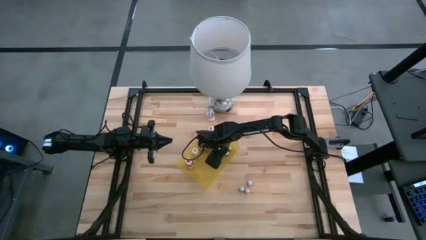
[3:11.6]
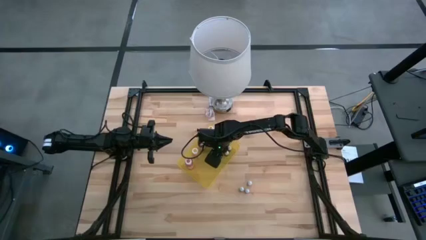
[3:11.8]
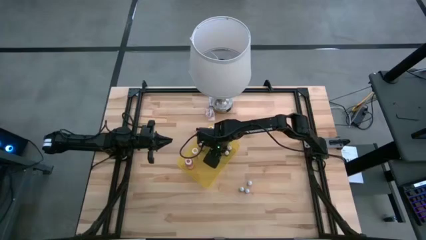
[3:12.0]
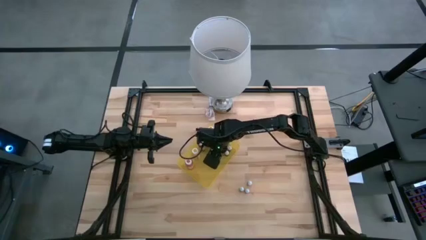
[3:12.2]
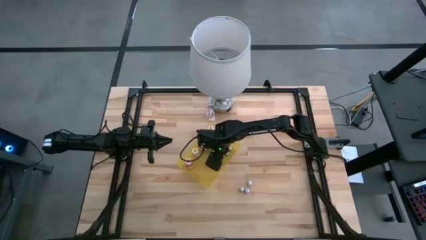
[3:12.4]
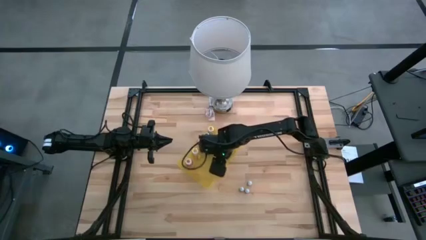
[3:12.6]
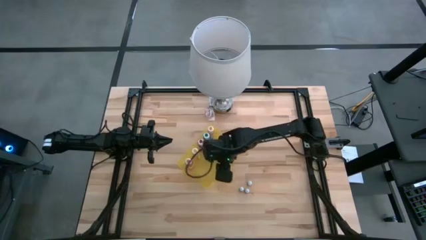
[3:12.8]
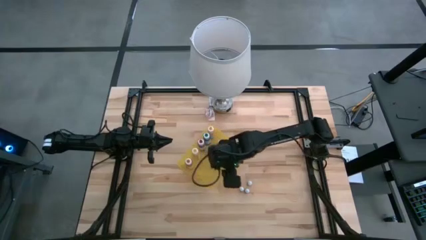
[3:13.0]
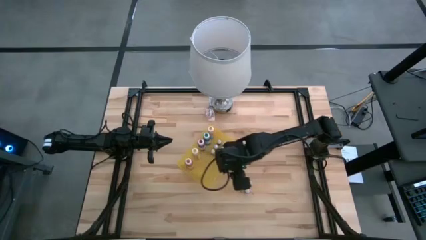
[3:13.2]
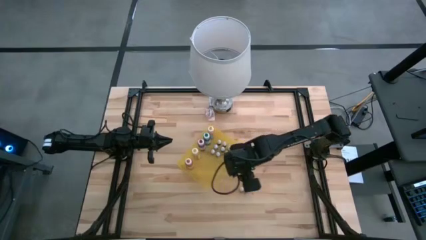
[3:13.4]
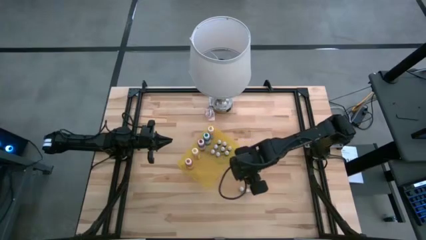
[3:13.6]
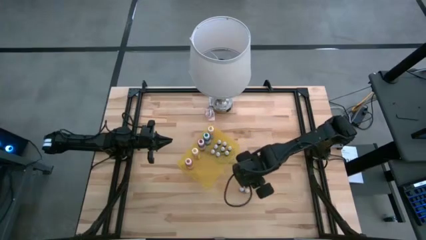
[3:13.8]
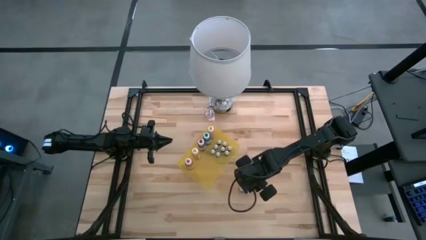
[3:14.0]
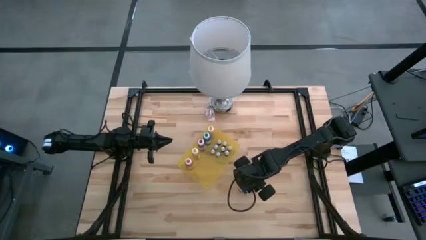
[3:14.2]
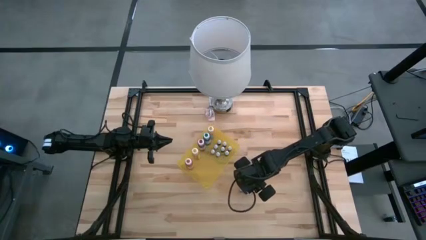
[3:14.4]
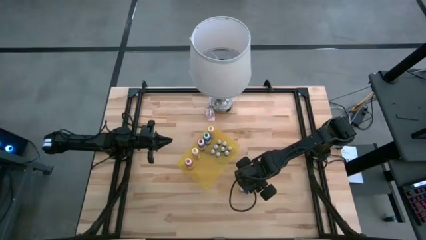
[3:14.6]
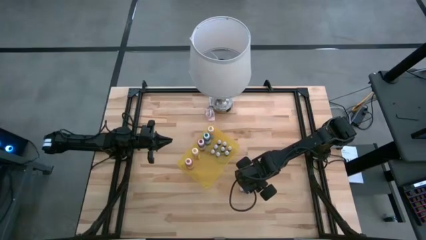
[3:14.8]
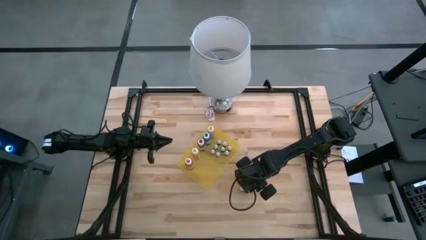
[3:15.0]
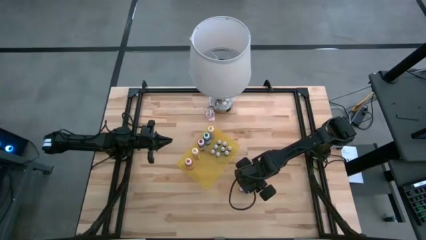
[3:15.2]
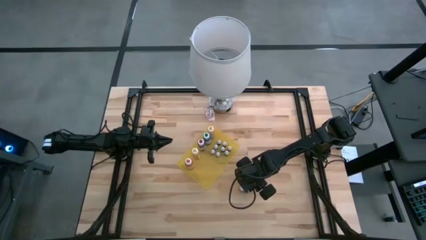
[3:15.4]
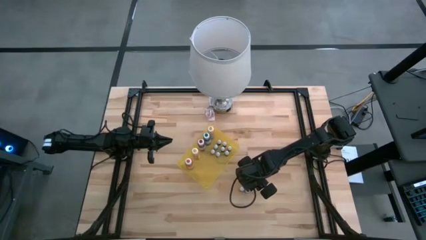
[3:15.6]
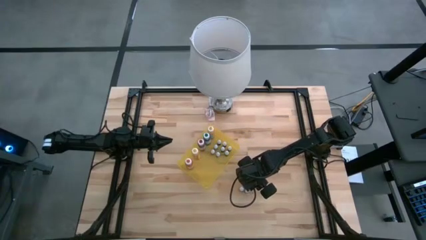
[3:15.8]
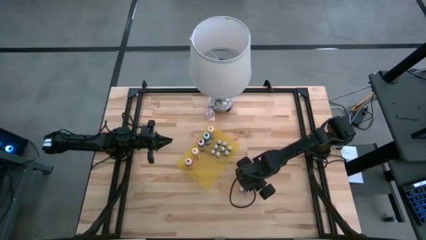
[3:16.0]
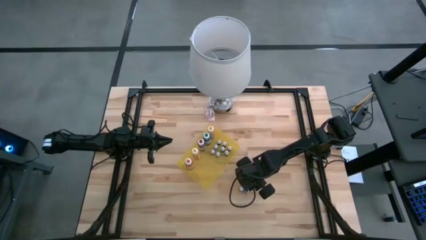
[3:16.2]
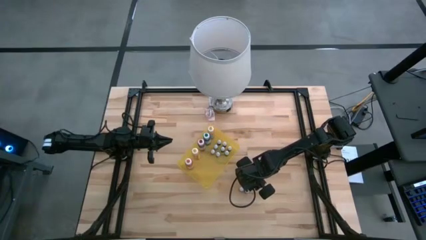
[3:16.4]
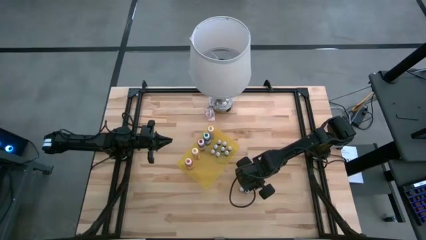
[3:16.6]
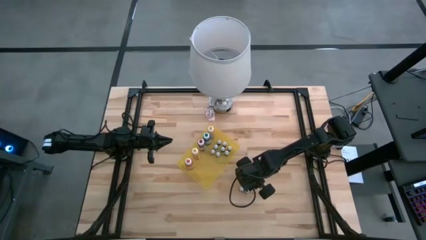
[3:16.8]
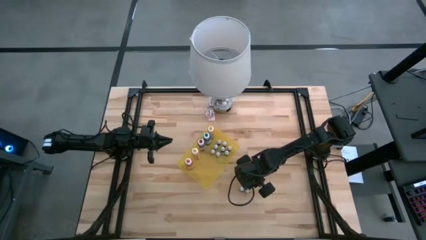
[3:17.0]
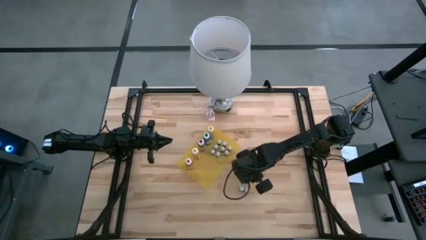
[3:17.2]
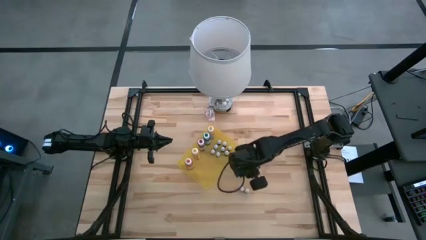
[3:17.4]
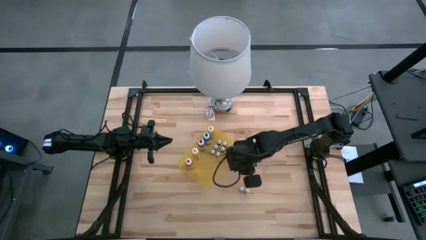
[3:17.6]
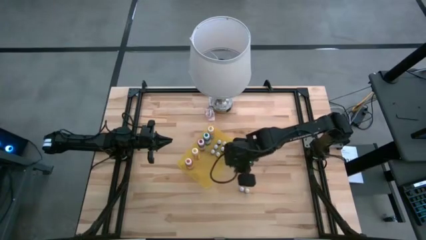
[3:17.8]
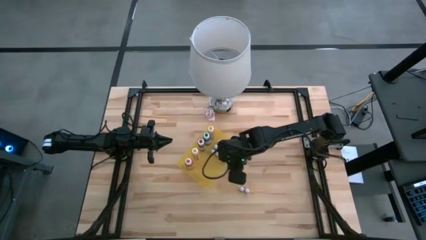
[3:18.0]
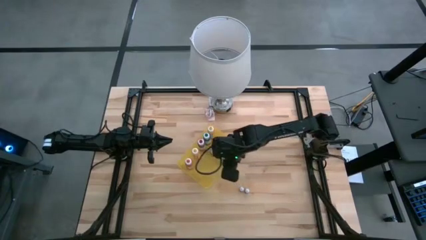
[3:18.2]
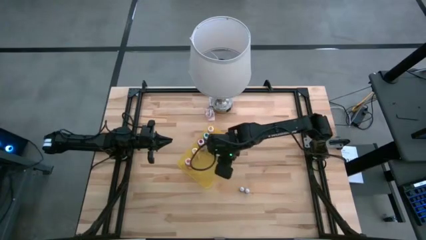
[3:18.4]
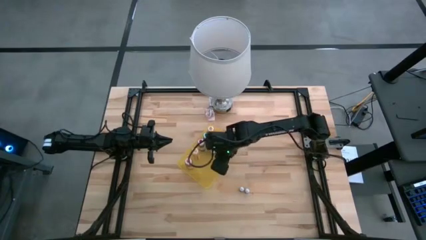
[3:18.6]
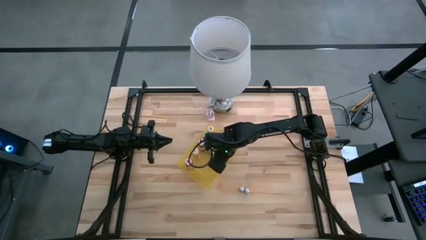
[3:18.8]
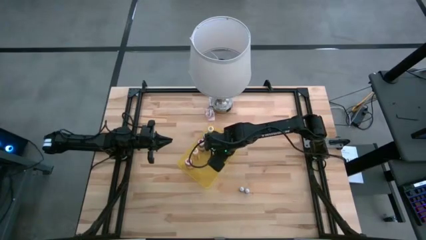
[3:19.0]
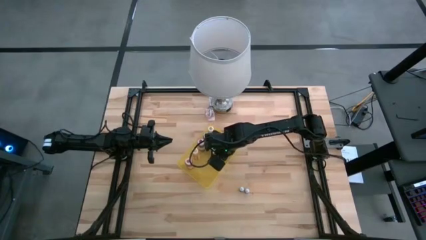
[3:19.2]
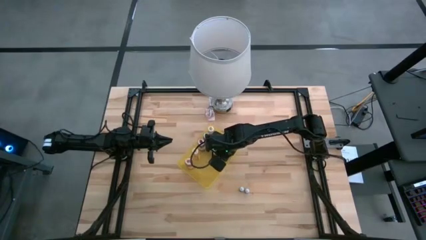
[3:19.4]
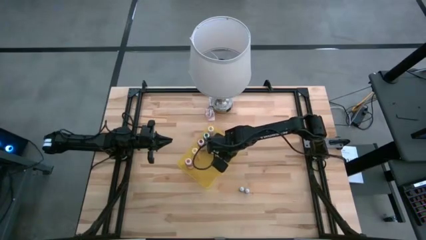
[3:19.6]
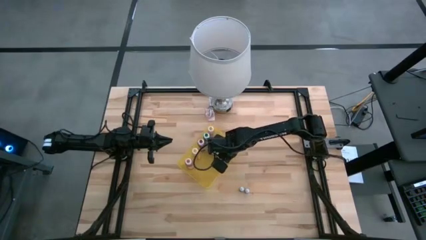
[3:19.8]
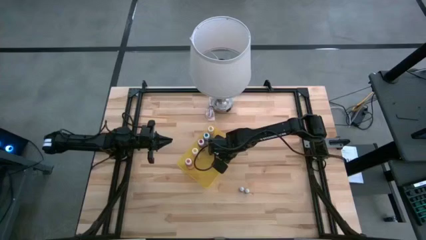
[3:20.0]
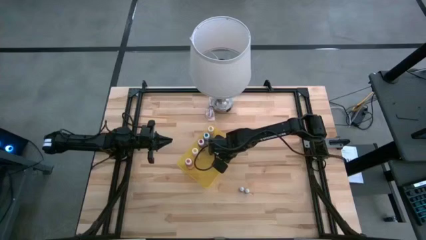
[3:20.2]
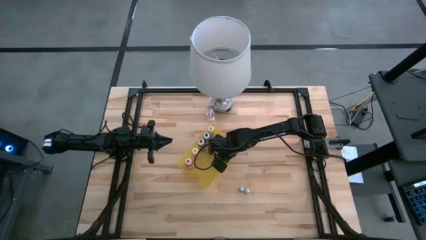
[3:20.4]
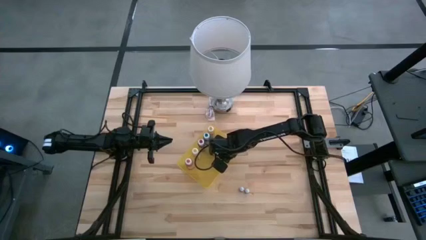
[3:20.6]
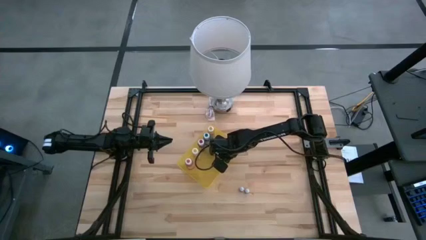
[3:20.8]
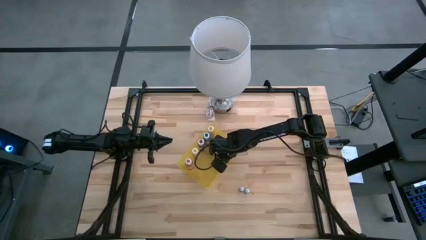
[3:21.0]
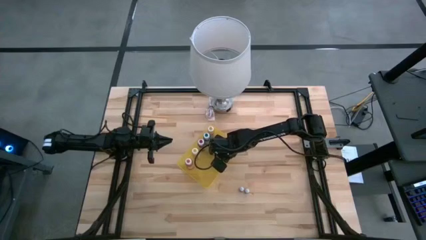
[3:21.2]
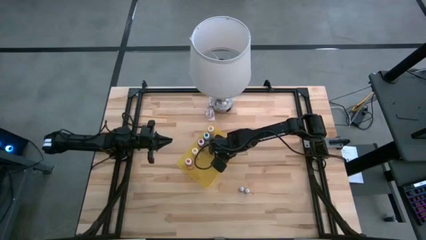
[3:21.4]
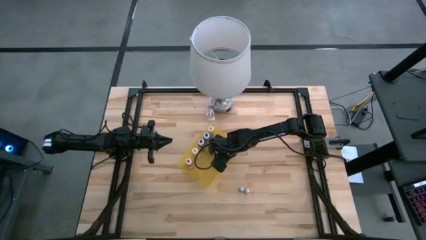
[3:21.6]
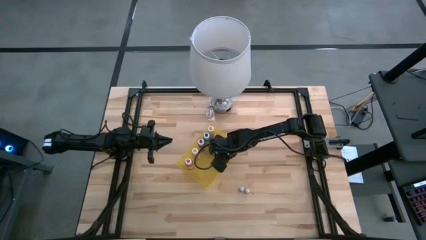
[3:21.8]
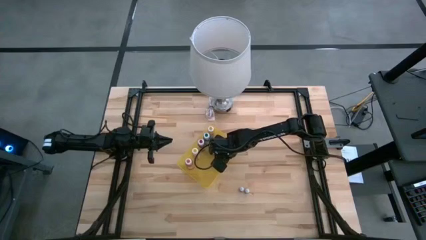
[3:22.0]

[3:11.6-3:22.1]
Task: Pick & Place food coloring
Put the small green food coloring bottle into the yellow bin

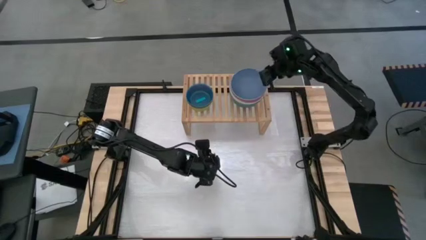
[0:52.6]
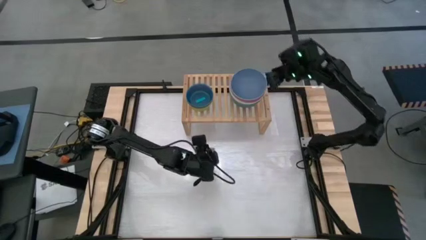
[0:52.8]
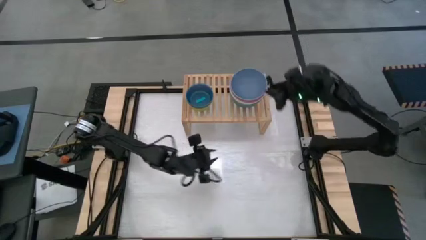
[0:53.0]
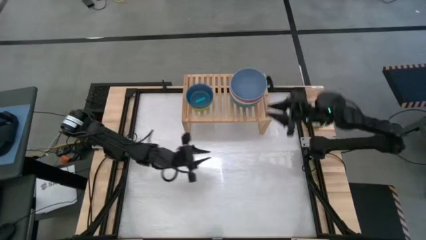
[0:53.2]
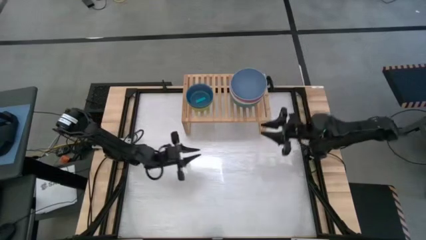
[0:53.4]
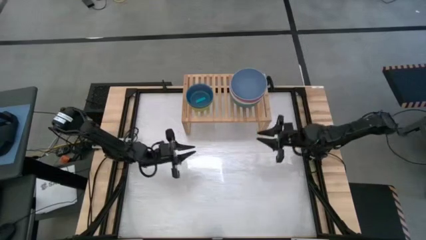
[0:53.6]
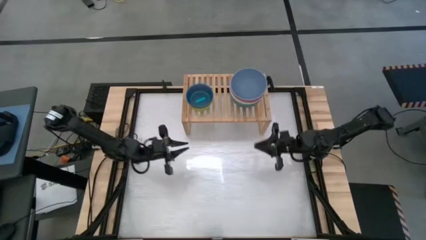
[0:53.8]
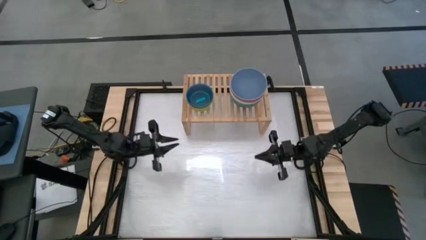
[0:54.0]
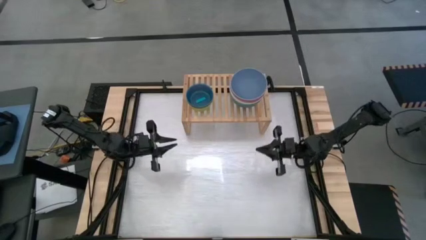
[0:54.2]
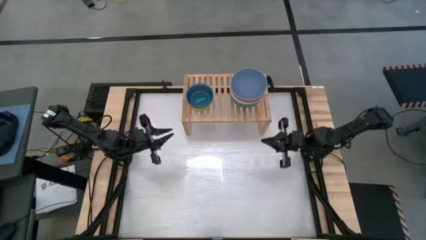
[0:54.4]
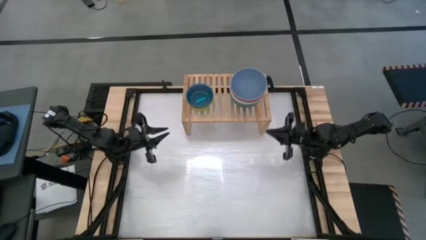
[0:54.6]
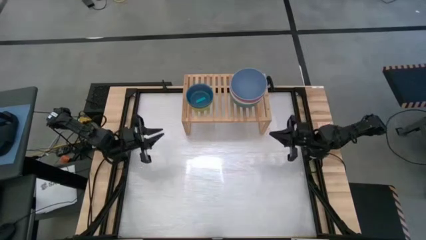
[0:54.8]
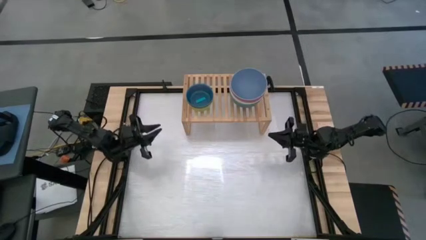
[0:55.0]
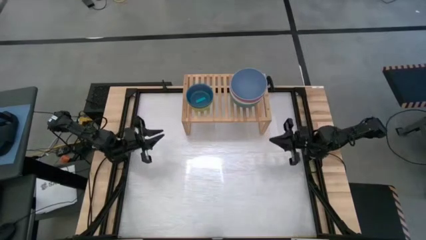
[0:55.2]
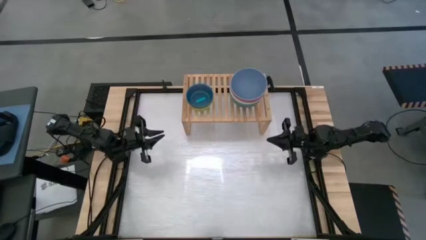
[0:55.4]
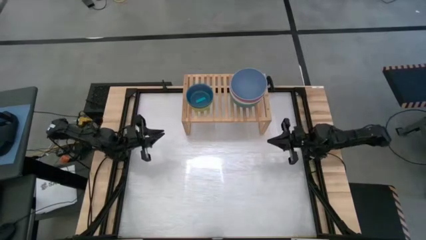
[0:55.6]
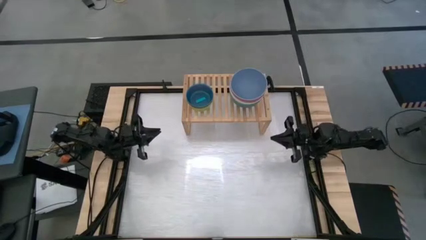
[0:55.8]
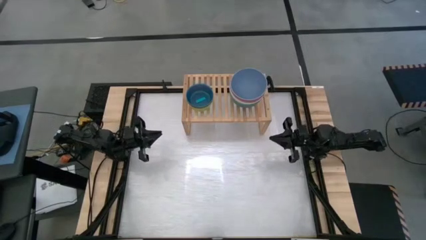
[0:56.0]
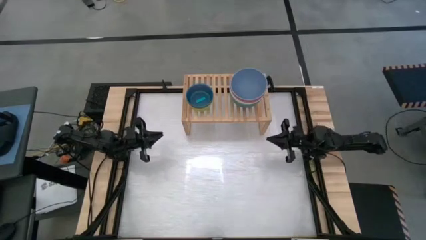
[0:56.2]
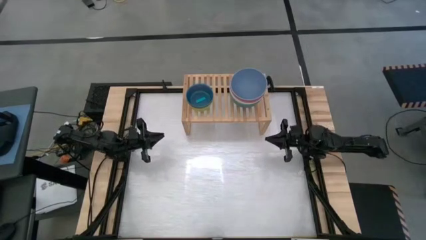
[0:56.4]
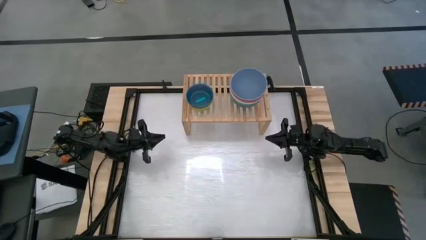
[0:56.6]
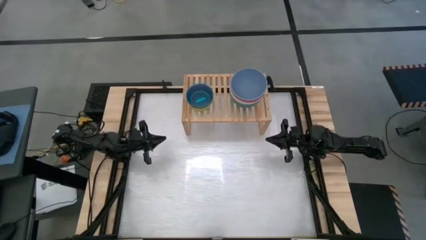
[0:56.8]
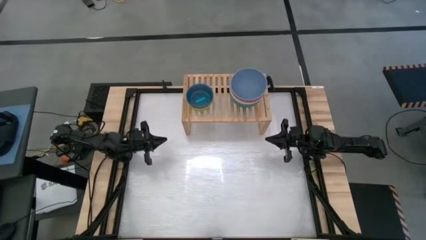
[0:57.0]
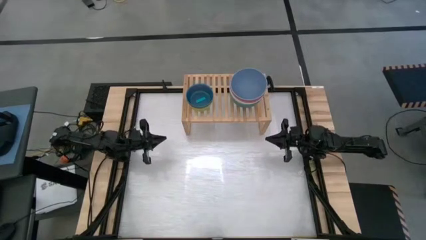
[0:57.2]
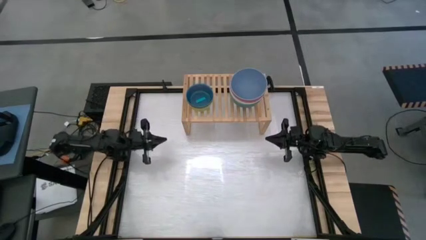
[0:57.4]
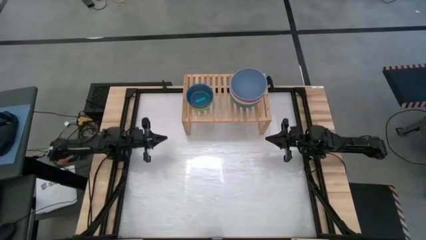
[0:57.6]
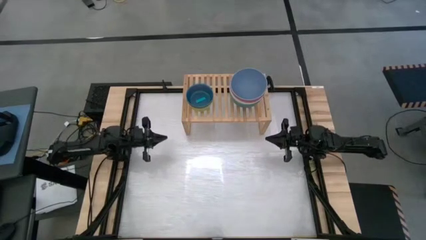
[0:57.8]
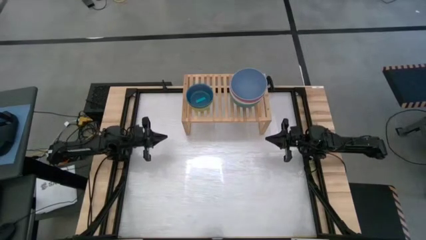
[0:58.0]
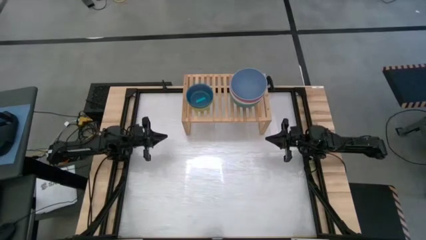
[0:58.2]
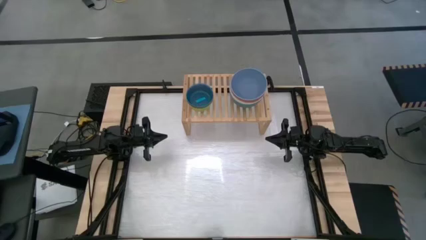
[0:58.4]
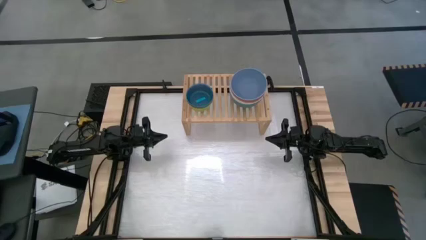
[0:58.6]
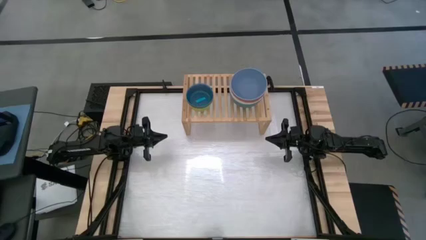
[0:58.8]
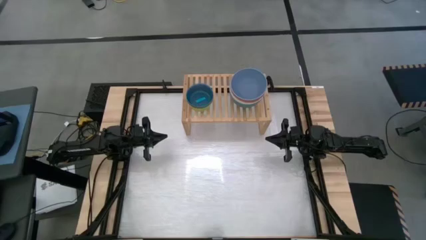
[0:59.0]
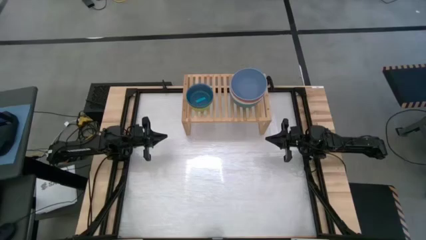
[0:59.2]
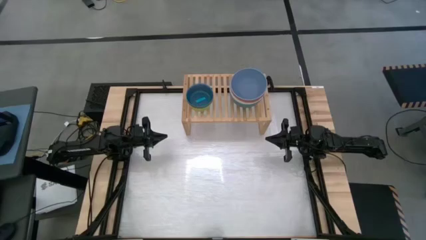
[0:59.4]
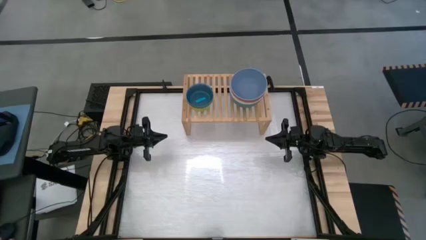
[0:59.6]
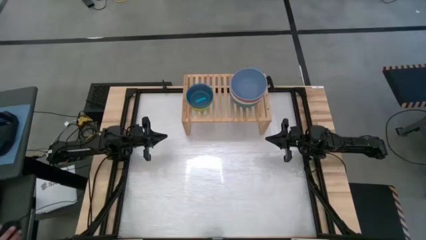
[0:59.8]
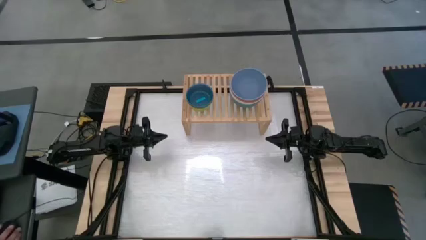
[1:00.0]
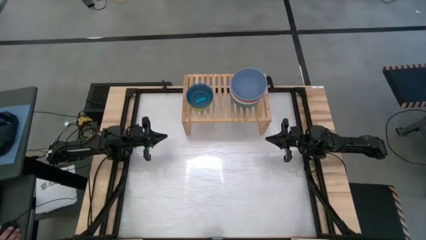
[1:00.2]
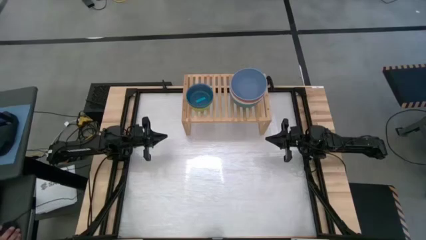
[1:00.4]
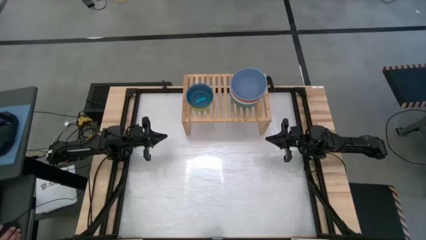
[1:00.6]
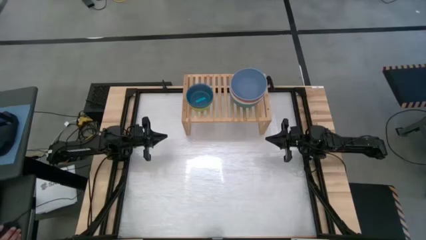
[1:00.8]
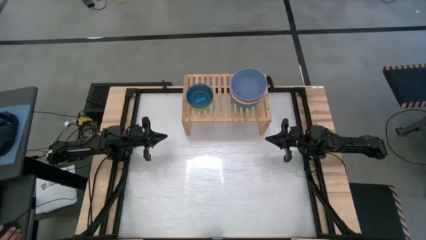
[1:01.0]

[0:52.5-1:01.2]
Task: Place and stack bowls onto a shelf
Return to Home Position
